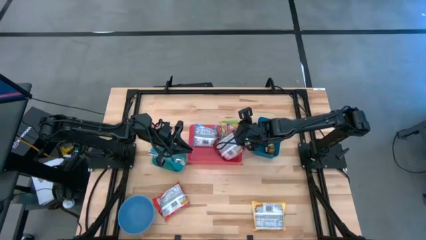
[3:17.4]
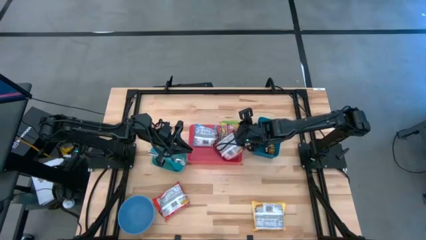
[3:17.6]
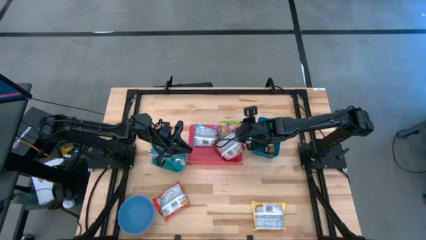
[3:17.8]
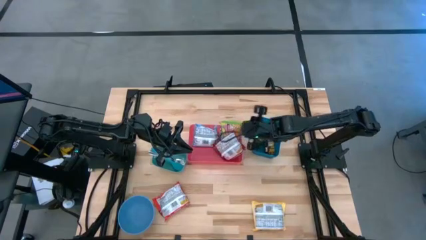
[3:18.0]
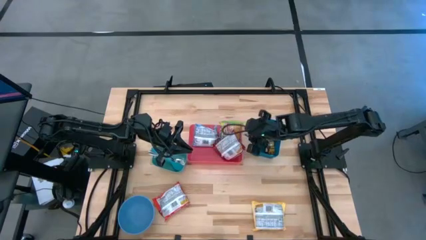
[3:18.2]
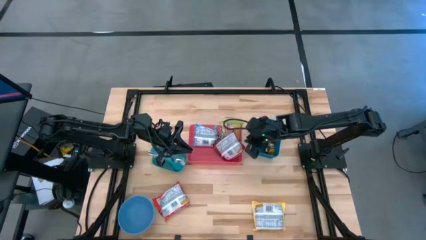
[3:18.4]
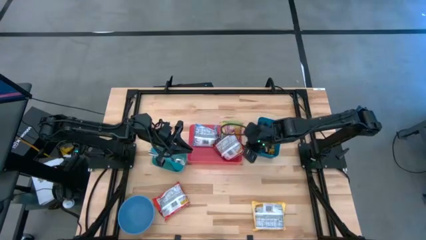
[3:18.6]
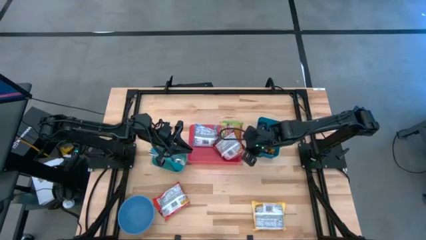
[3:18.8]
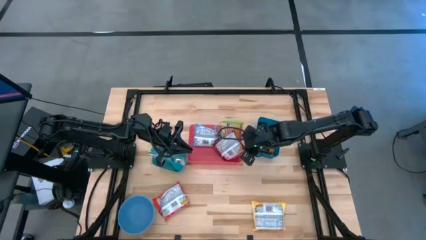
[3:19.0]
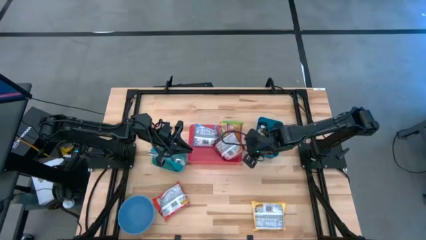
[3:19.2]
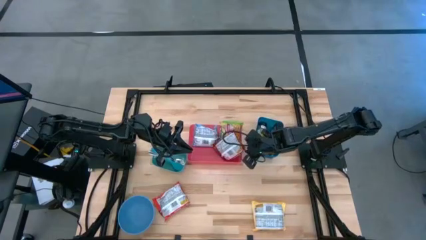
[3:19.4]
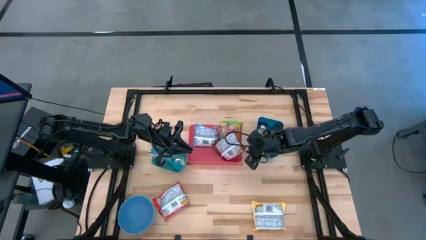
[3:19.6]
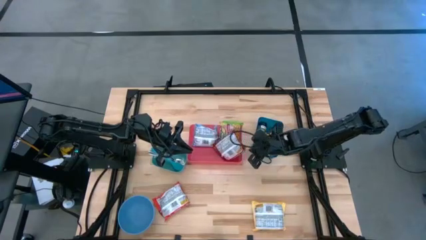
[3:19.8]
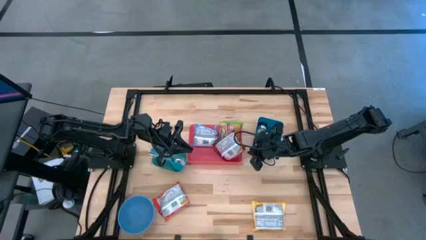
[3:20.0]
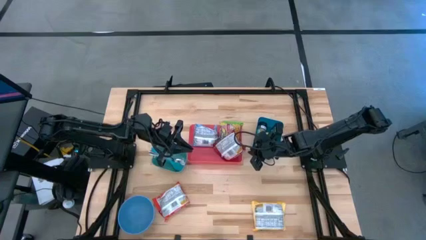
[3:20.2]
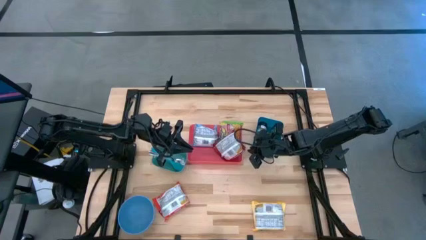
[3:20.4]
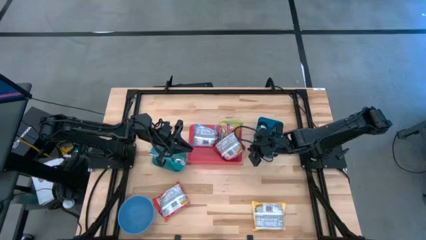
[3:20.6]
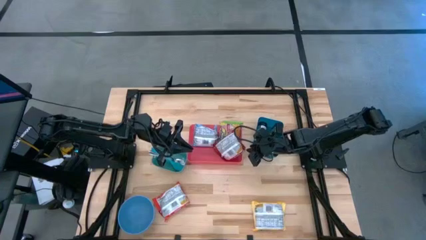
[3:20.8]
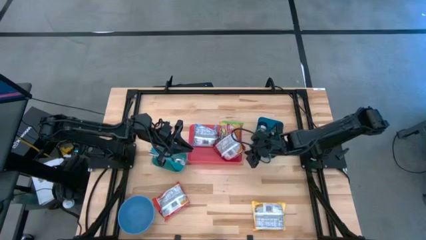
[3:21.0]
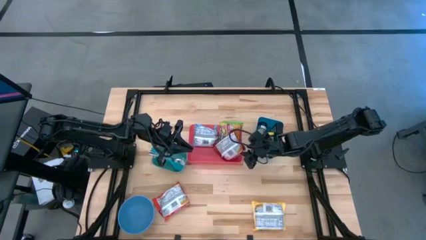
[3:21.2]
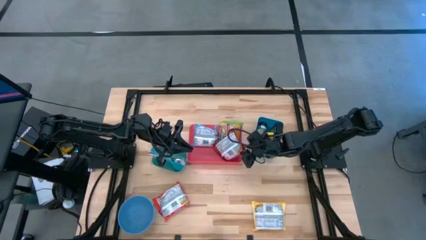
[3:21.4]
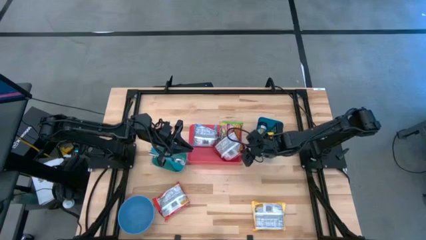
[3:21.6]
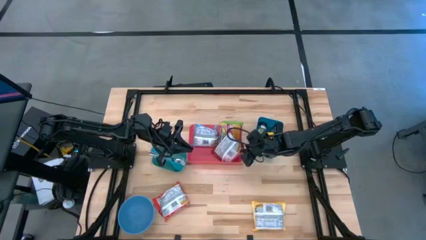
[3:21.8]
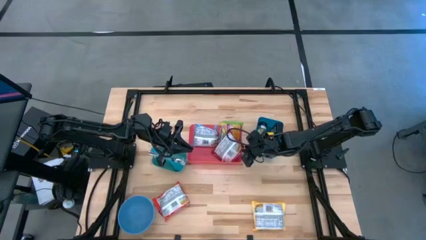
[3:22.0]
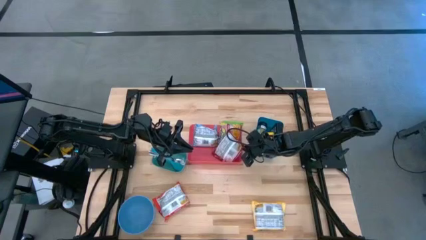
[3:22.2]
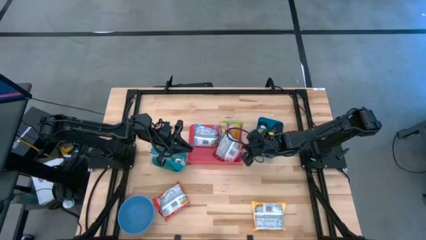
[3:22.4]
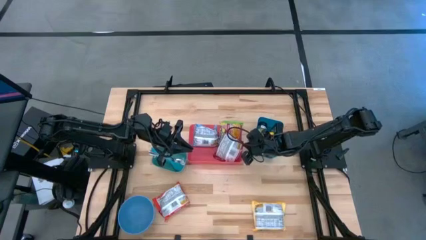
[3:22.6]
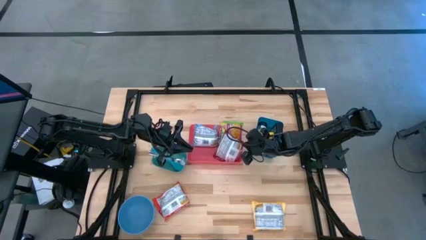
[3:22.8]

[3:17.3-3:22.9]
Task: Pick & Place Food Item
Put the red noodle pack into the red bin

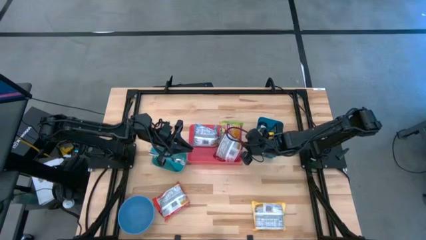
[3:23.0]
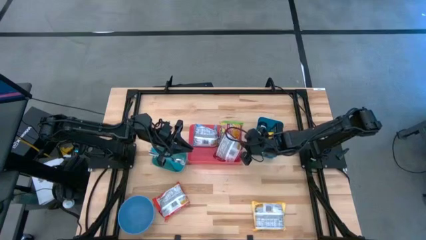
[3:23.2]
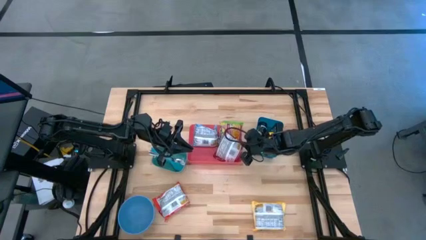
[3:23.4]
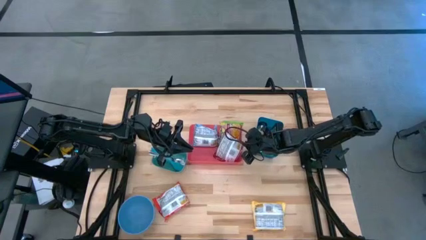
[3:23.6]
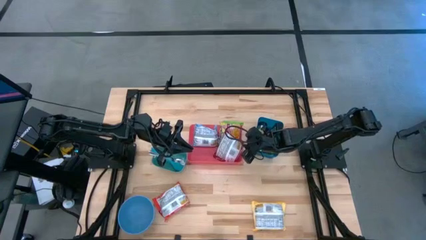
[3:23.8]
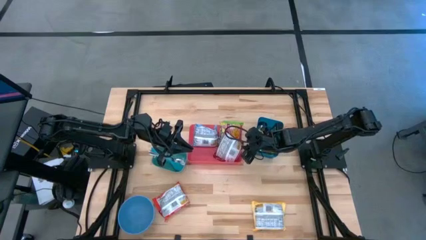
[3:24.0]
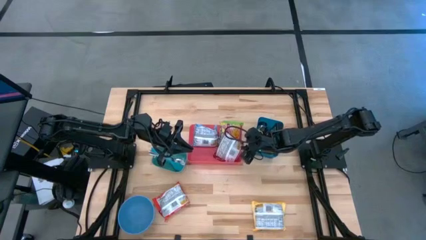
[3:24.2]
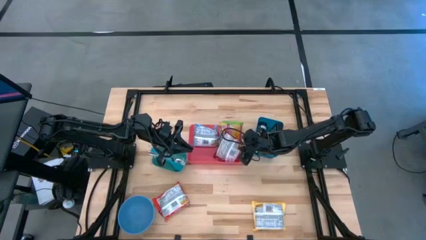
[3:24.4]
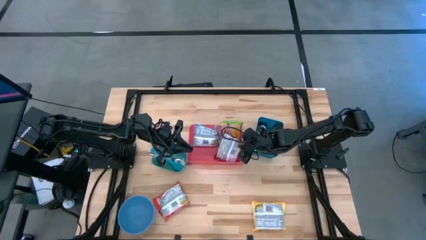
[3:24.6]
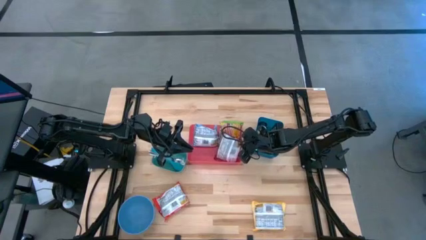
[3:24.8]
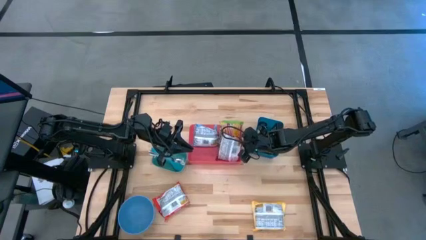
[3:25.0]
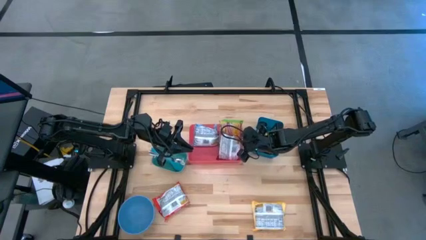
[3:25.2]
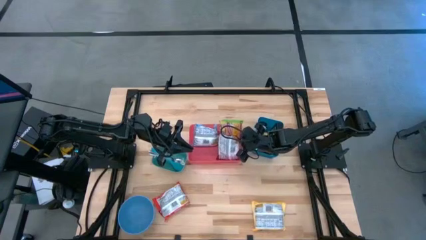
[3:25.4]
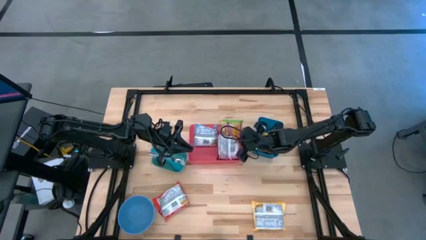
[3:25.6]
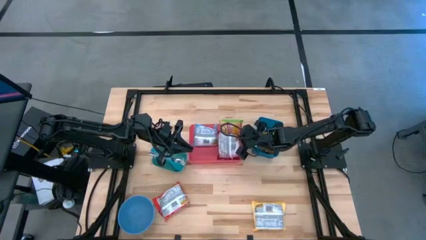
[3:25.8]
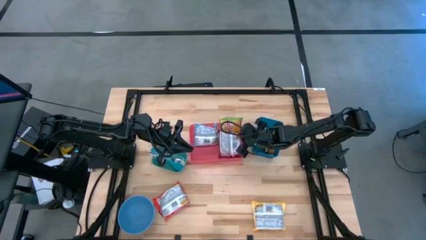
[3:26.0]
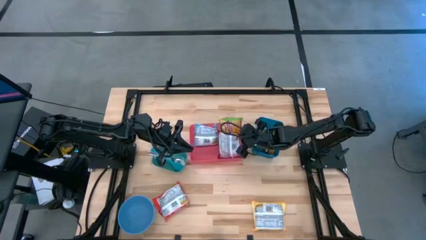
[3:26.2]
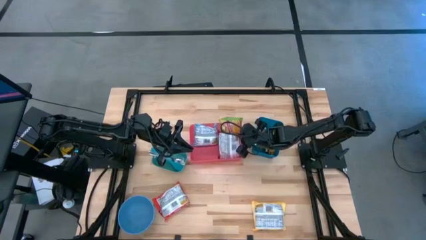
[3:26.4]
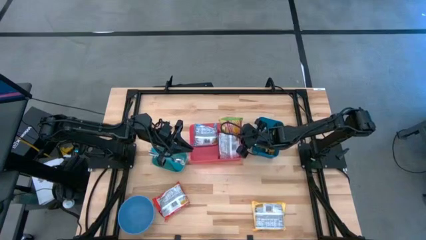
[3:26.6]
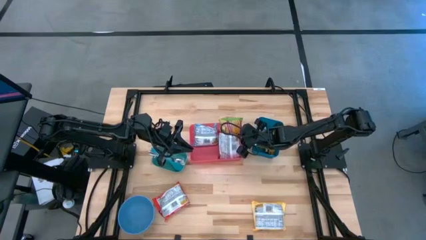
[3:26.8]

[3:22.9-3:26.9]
Put the red noodle pack into the red bin

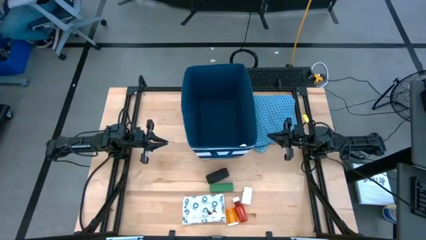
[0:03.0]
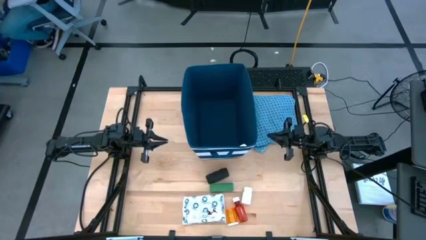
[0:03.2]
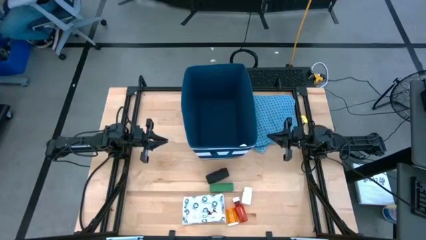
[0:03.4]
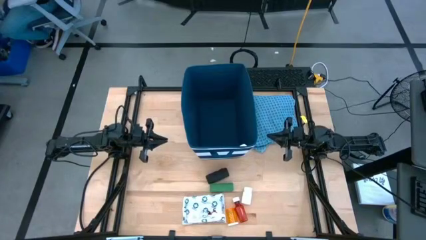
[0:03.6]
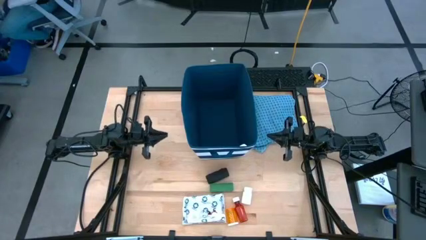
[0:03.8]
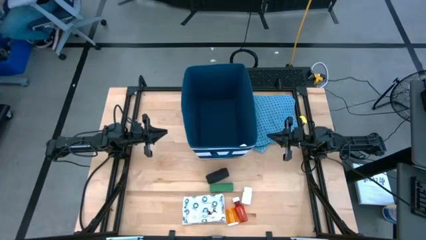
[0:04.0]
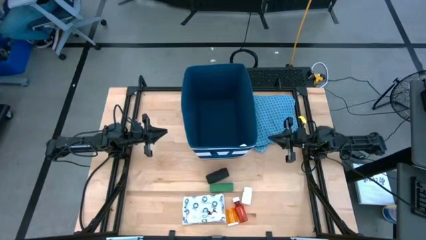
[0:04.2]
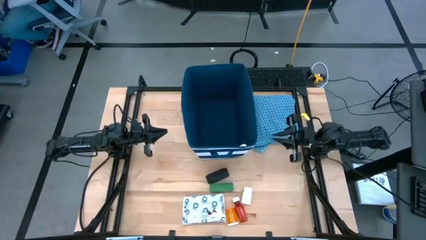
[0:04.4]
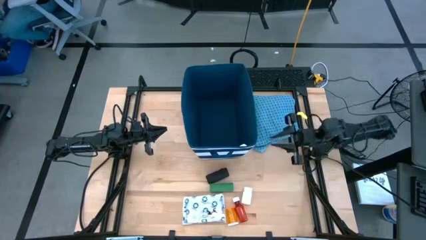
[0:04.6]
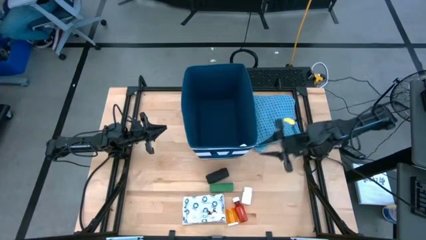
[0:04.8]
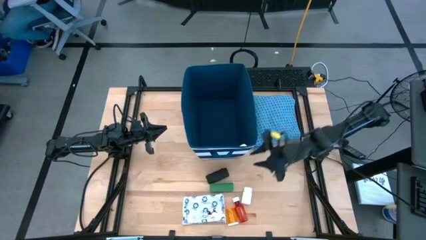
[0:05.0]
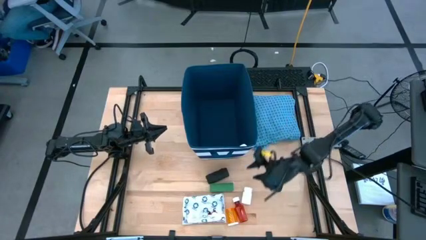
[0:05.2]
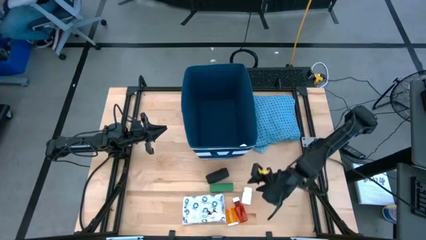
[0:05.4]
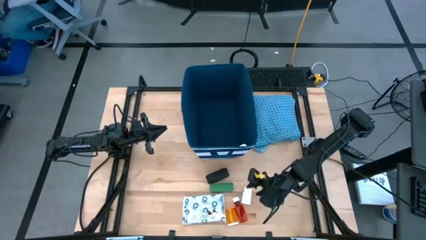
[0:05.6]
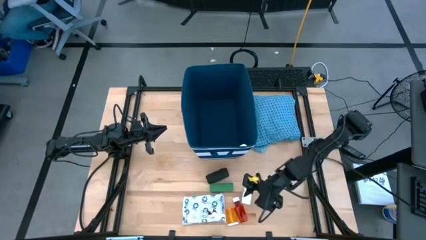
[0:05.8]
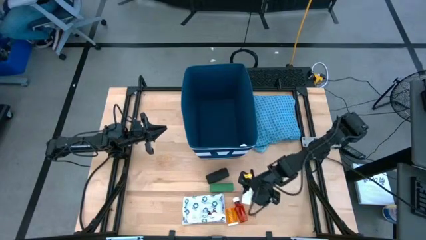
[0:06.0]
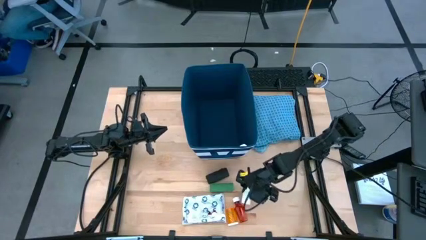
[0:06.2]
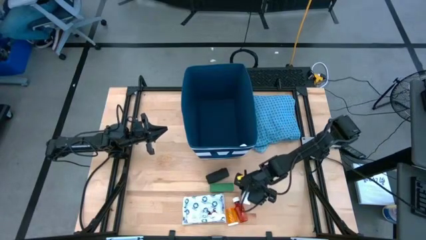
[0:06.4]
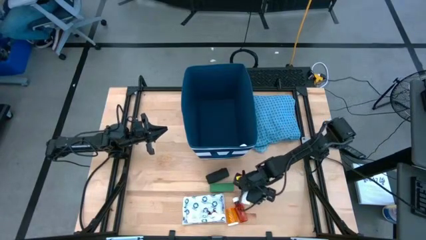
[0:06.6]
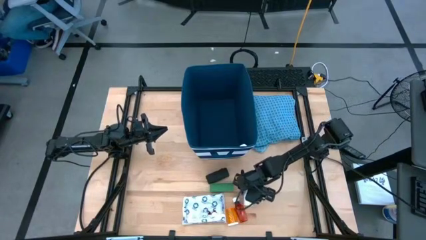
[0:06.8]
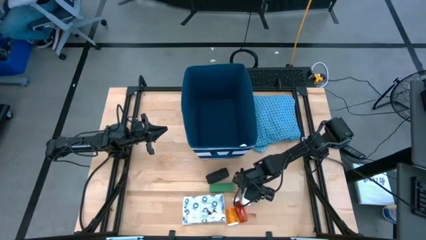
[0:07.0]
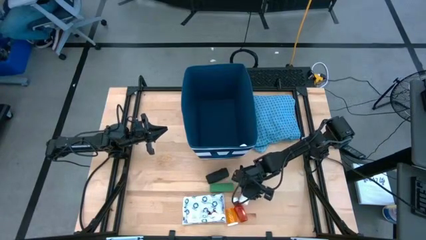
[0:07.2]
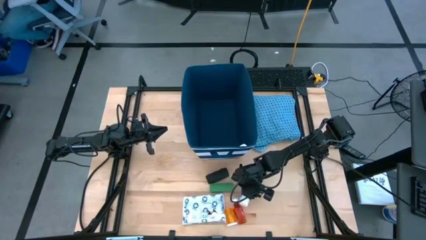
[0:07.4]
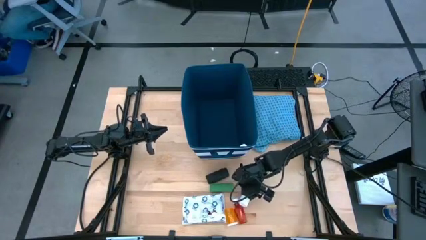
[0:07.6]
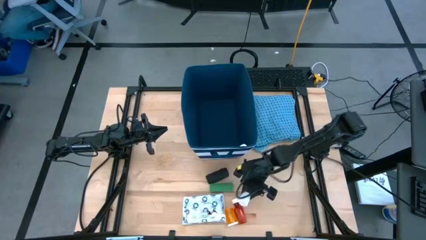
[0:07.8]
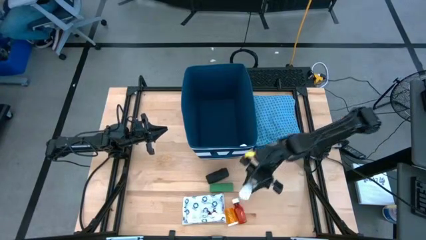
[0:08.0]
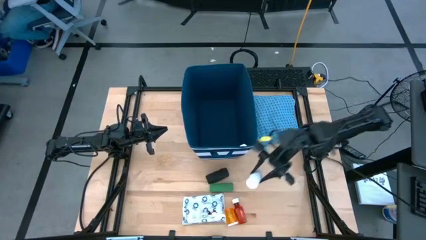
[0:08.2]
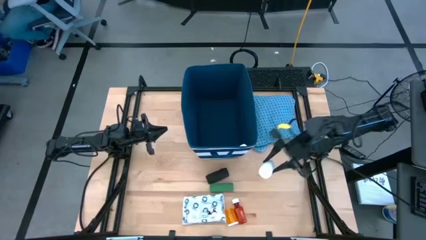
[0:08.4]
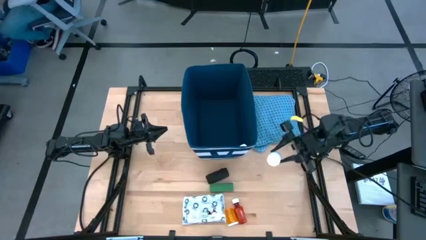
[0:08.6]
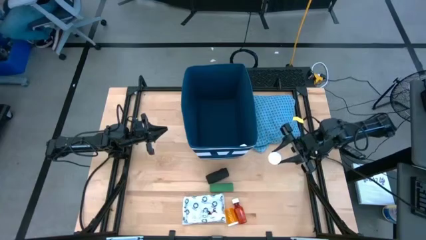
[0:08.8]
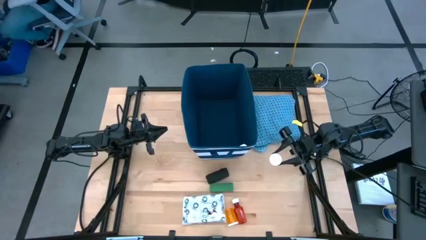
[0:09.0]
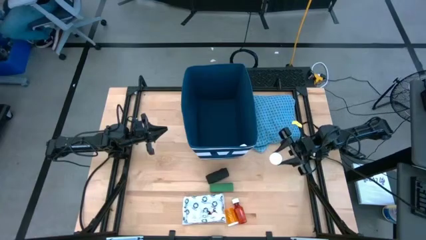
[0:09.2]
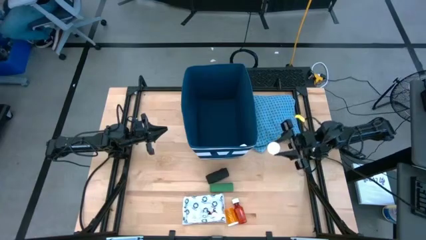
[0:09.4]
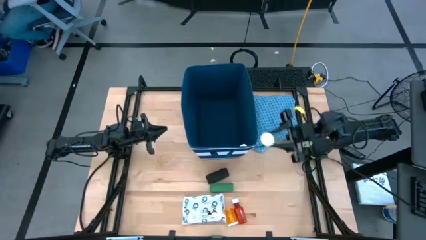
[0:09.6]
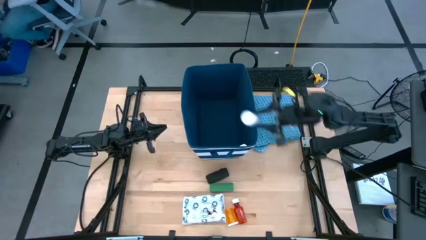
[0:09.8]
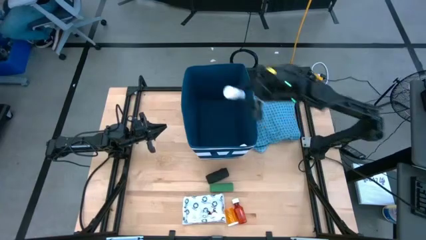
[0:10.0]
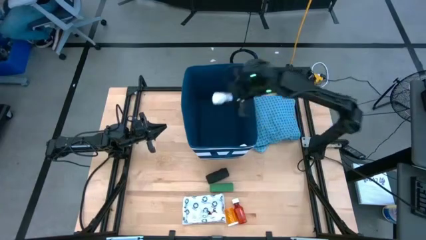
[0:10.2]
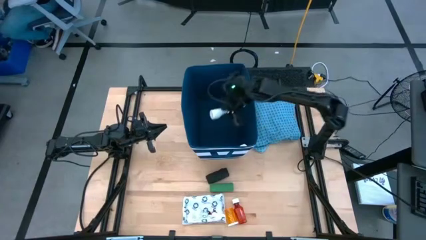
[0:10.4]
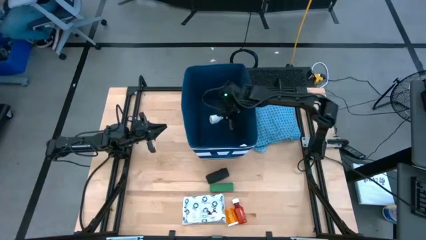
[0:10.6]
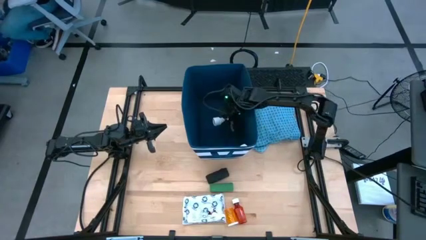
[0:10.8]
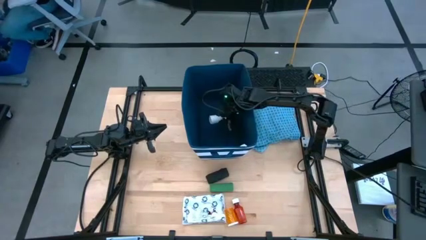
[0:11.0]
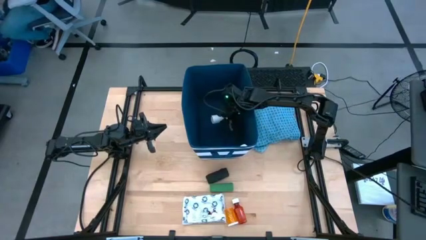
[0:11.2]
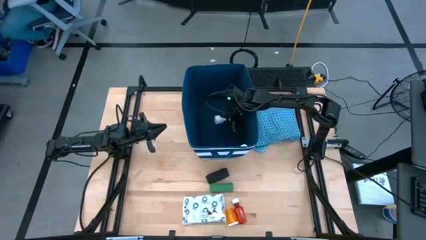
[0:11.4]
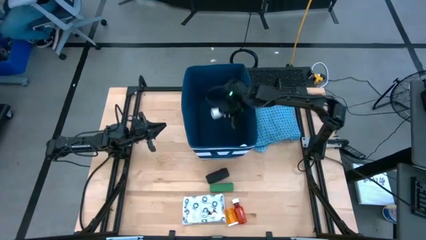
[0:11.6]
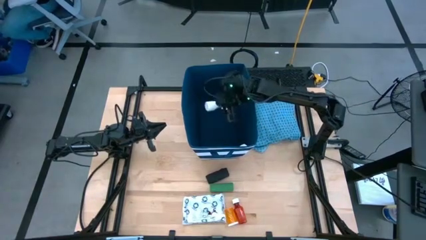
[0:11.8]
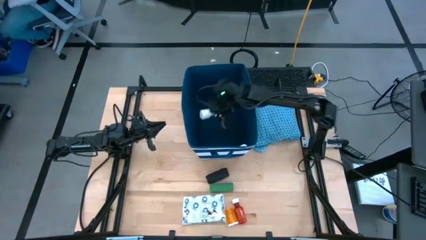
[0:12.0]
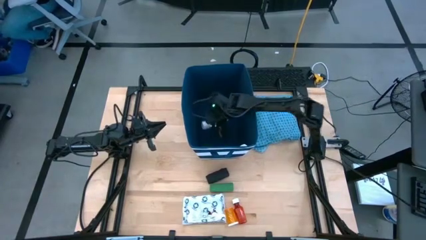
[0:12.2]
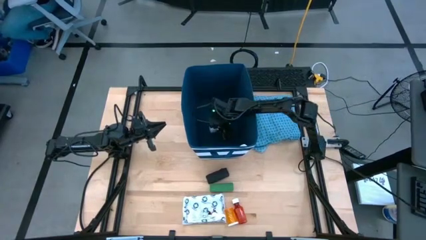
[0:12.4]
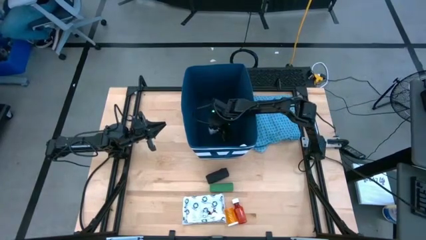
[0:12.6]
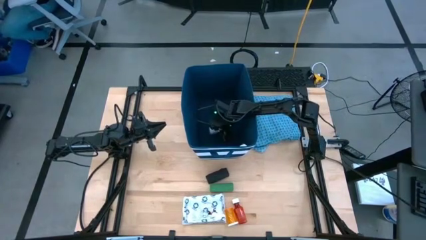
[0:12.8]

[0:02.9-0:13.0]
Task: Pick & place medical supplies in basket/bin
Put the white pill bottle into the blue bin
